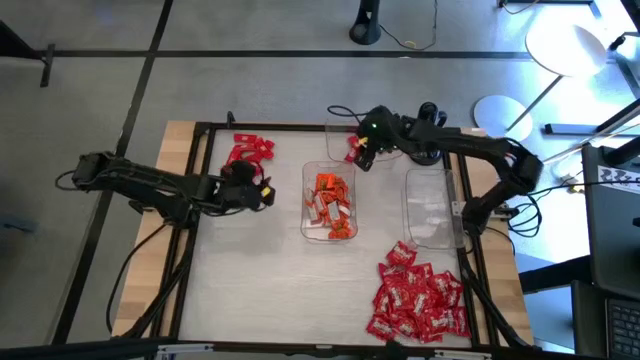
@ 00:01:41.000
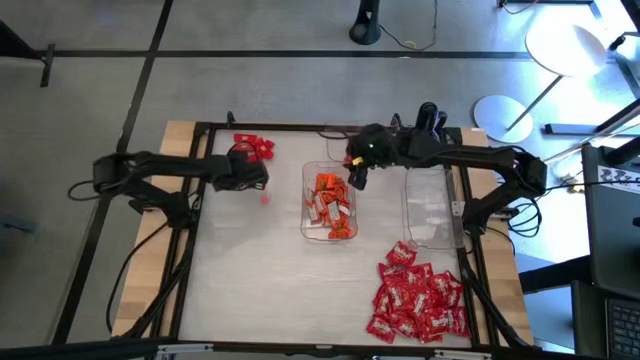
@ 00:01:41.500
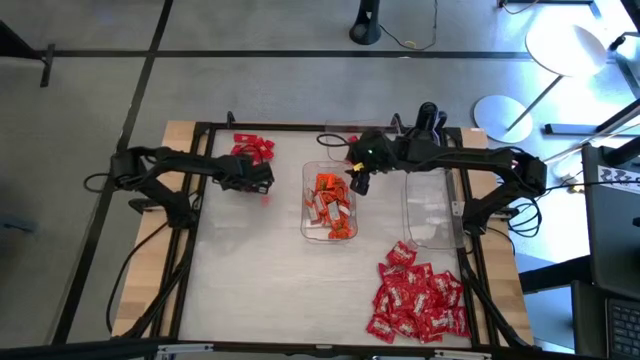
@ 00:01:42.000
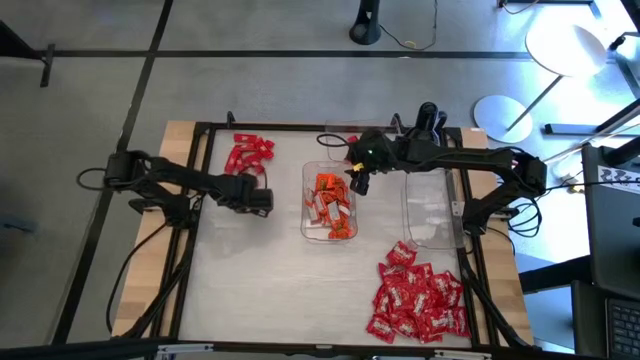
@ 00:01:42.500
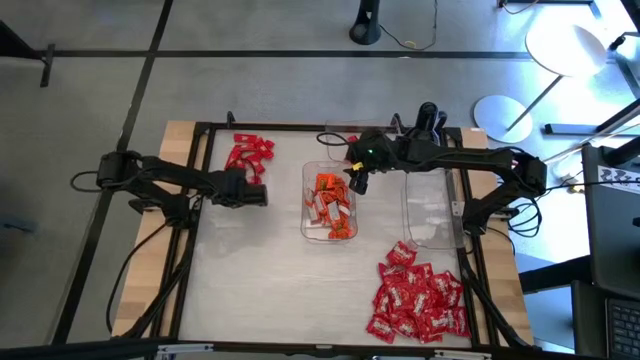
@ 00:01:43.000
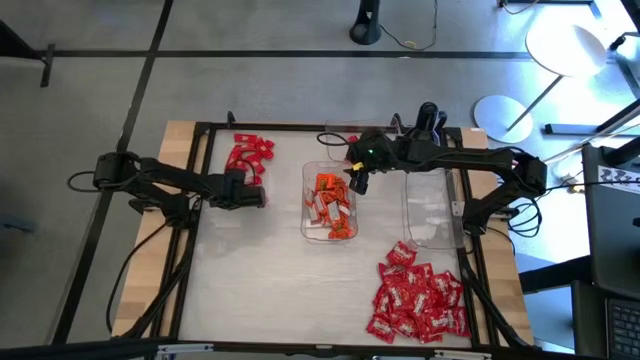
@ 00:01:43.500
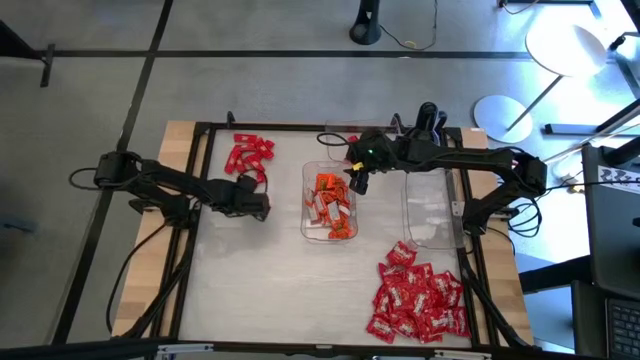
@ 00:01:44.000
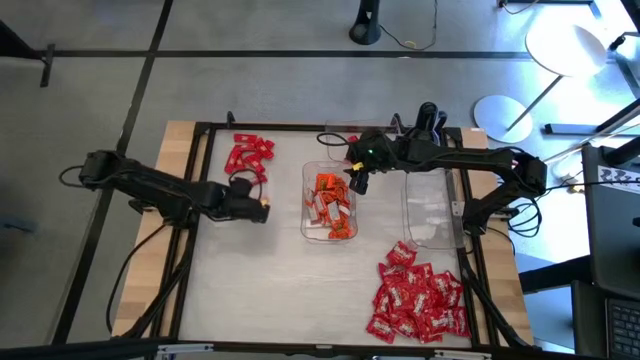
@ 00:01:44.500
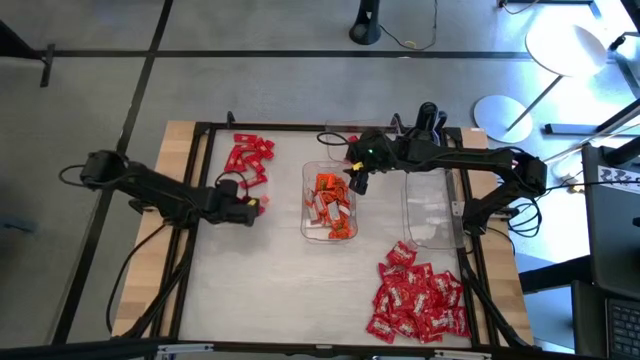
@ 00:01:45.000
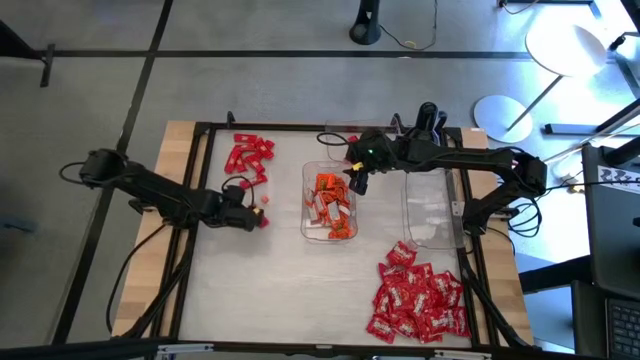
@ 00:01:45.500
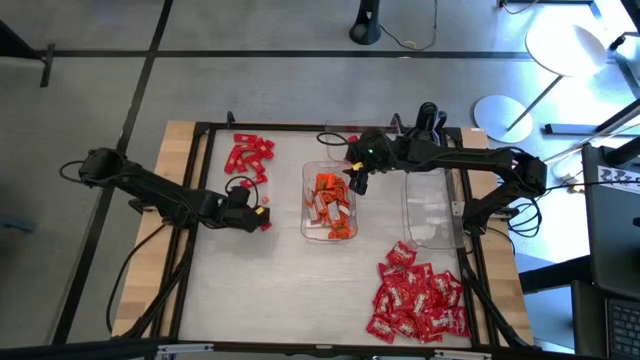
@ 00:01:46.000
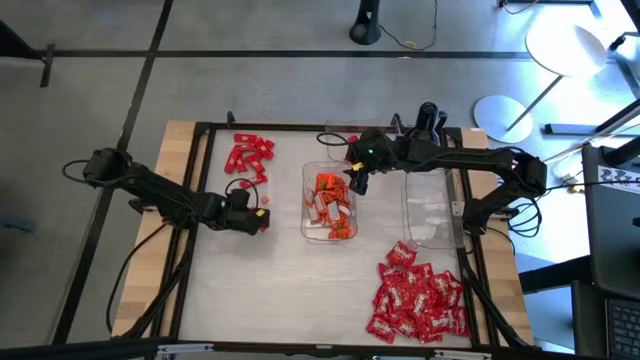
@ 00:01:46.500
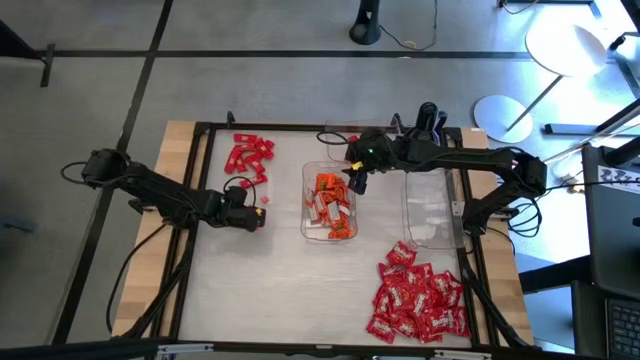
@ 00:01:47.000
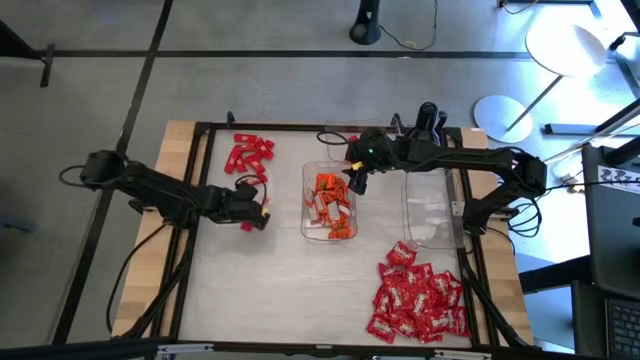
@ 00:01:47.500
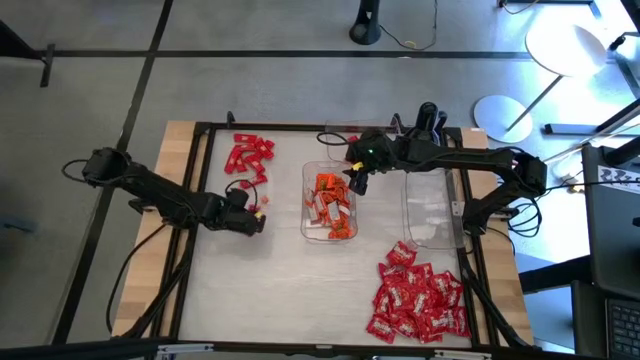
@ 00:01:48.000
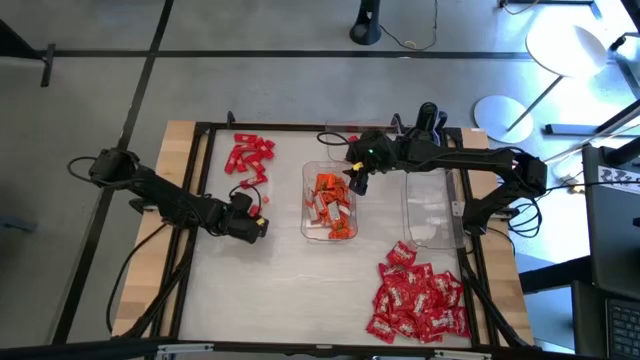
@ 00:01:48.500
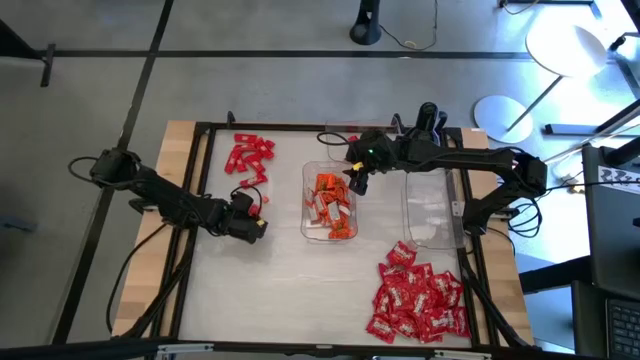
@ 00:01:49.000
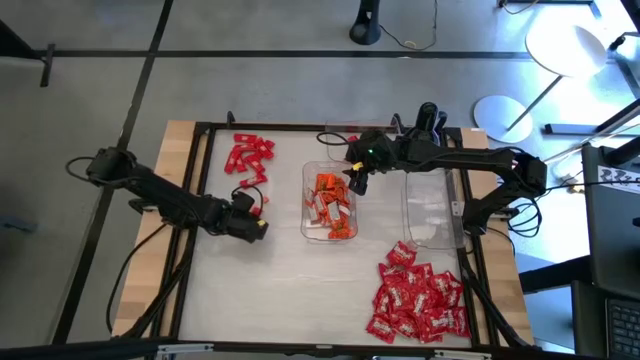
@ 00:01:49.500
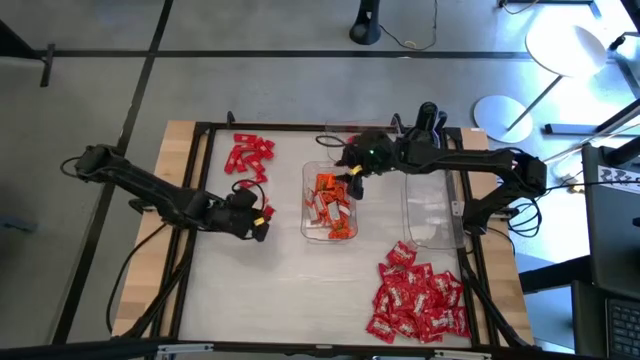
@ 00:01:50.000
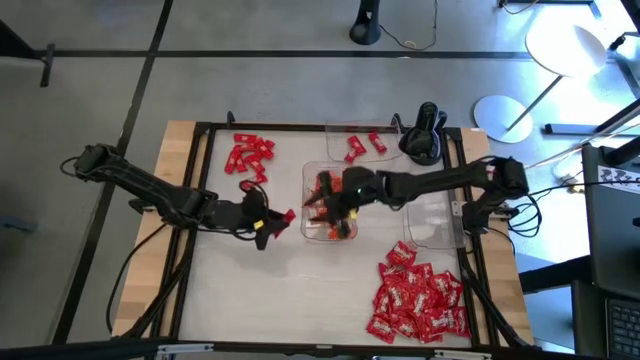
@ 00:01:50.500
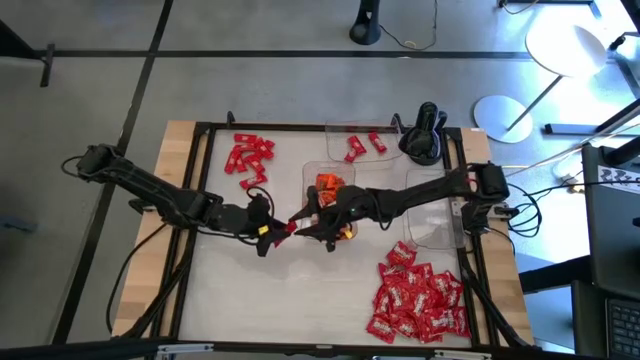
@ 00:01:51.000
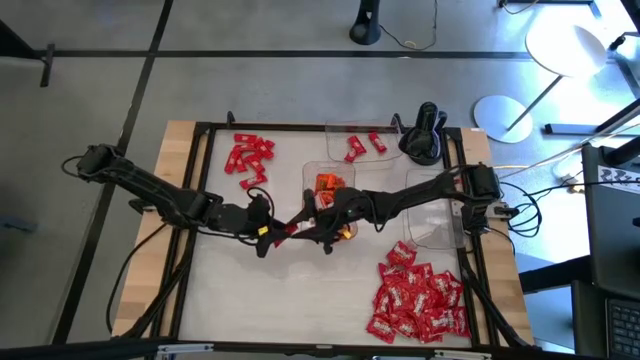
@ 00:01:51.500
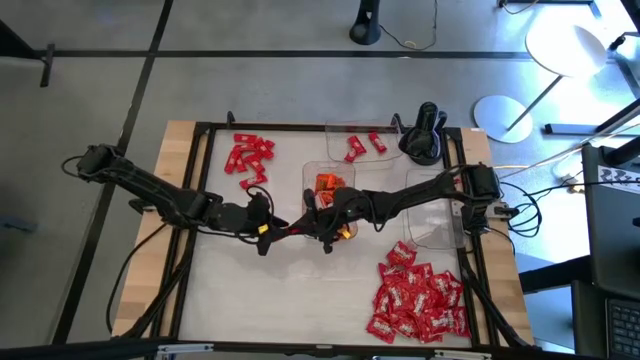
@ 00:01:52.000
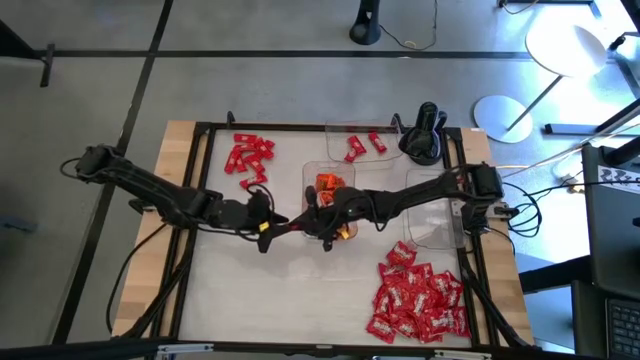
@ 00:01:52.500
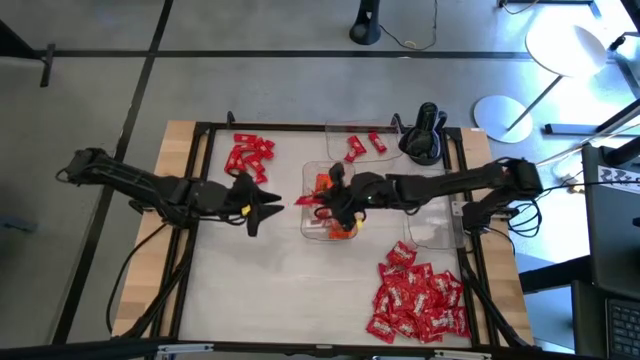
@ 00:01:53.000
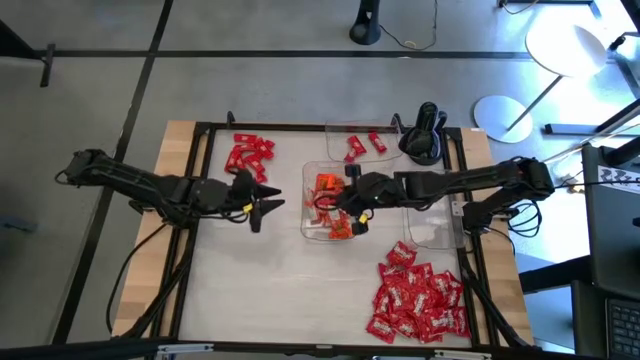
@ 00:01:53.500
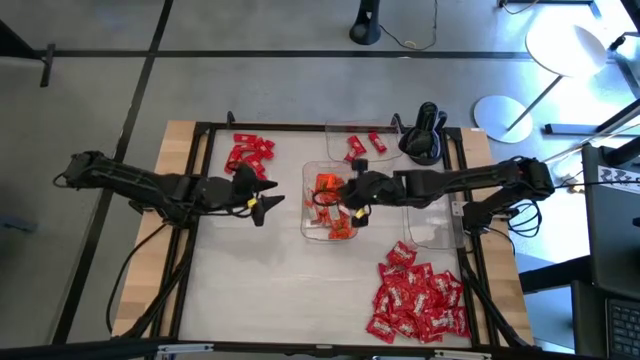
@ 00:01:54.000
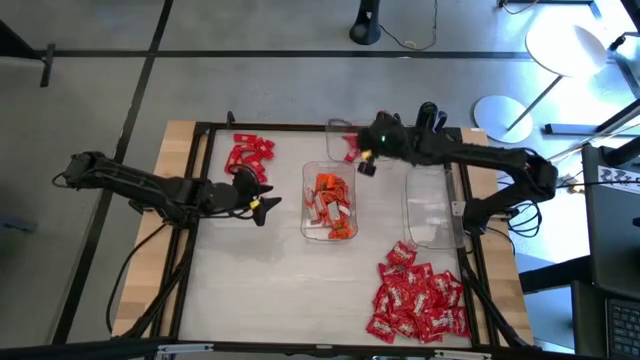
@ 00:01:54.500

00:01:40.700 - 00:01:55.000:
Task: Sort candy
Put the red chocolate into the top transparent bin

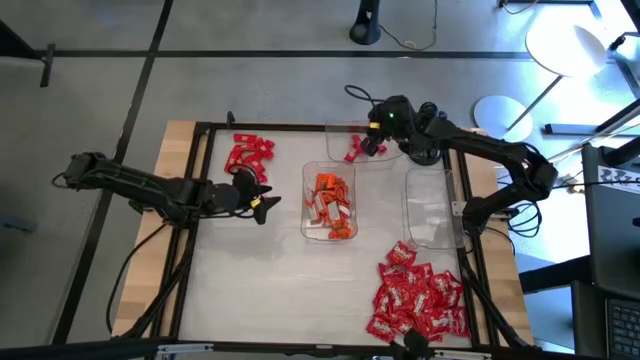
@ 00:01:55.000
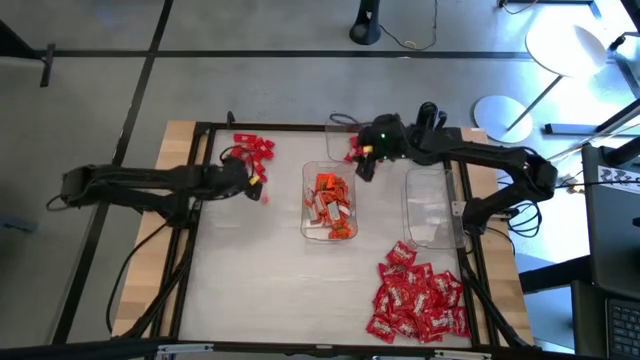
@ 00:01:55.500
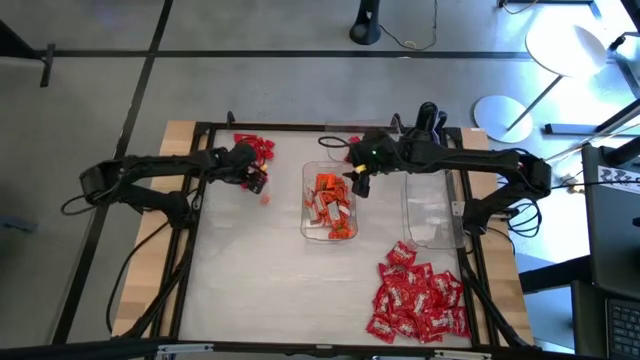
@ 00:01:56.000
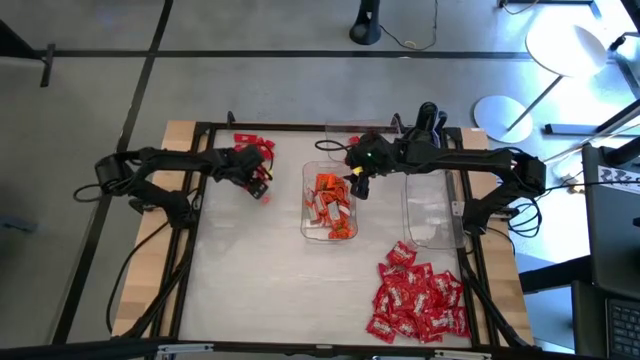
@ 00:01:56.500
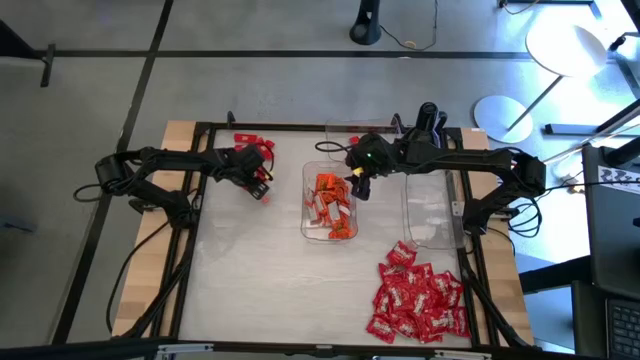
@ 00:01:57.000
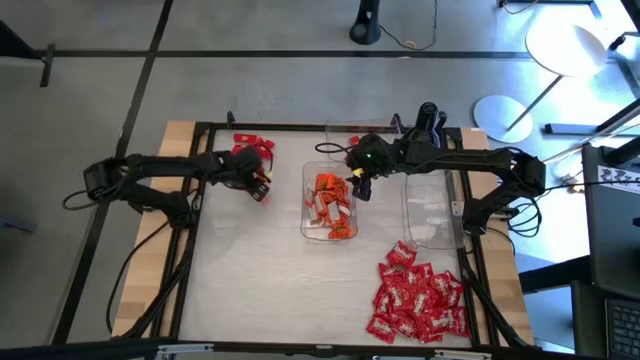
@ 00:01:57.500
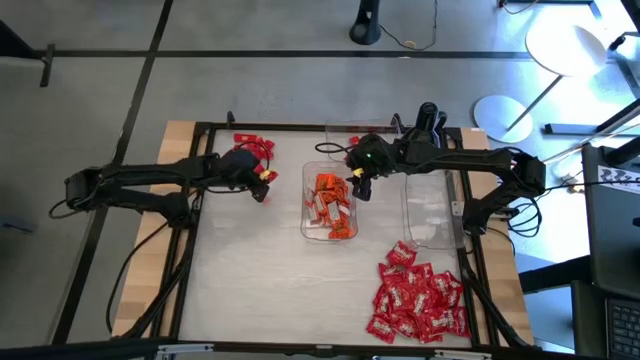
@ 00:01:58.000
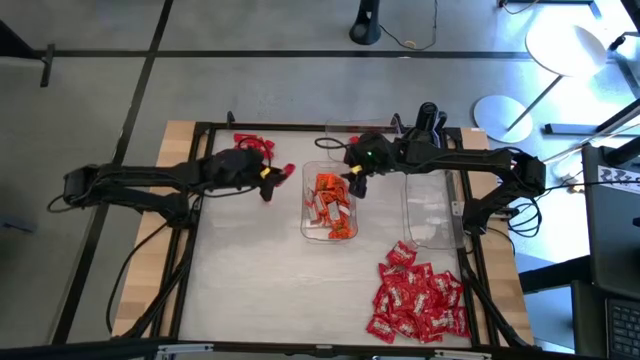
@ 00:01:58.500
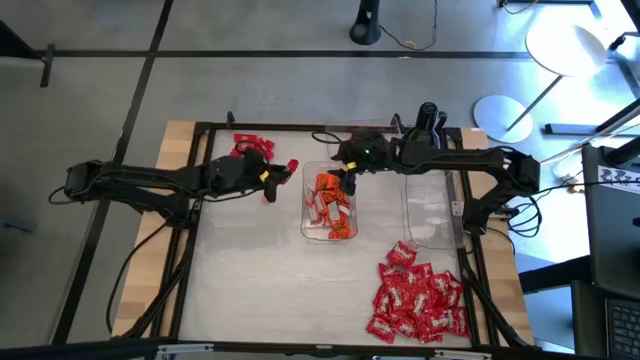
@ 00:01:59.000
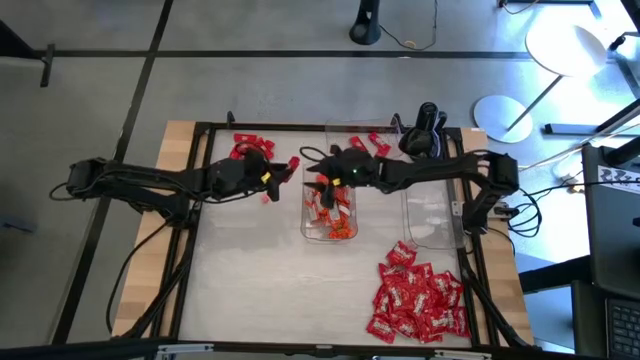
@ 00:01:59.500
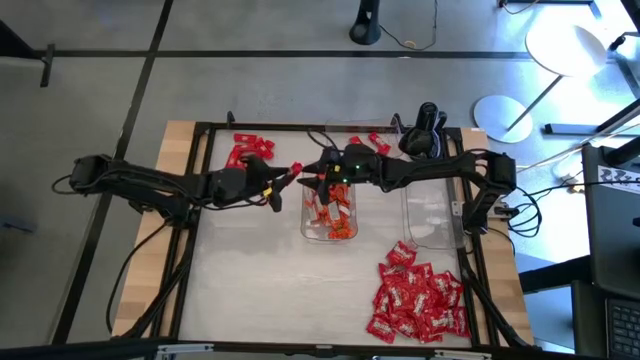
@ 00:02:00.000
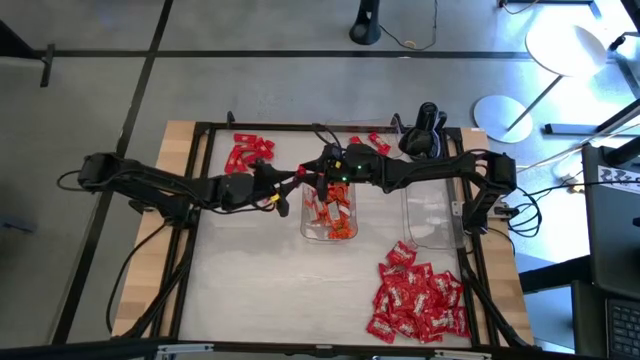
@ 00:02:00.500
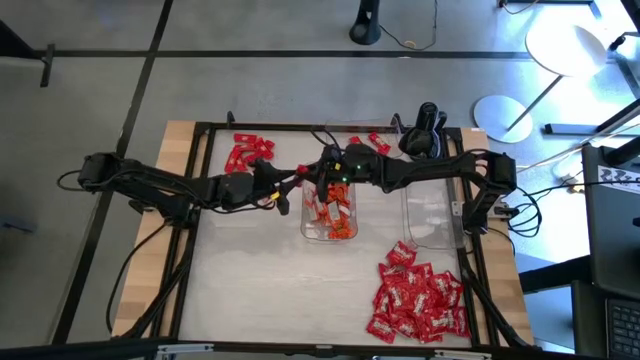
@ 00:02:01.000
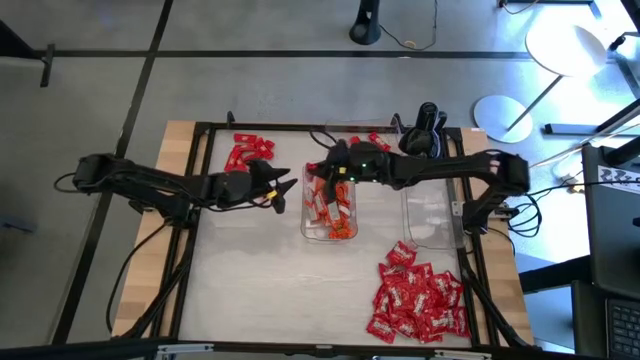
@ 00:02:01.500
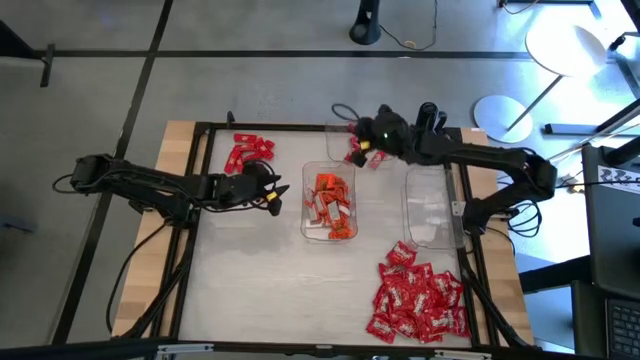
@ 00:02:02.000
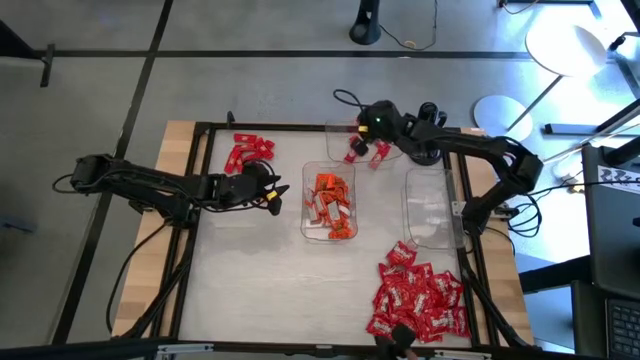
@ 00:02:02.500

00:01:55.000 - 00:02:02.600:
Put the red chocolate into the top transparent bin
